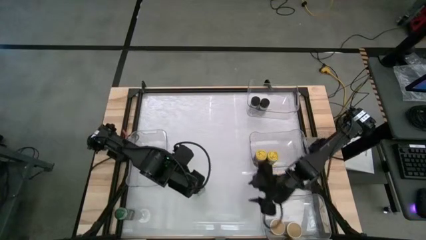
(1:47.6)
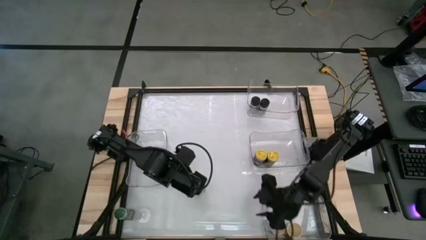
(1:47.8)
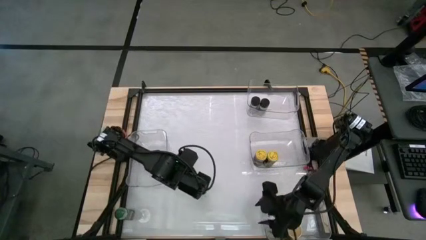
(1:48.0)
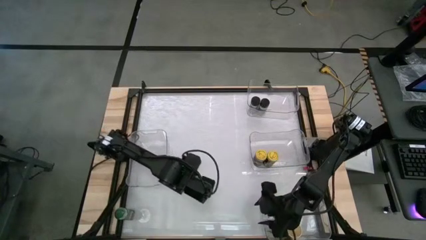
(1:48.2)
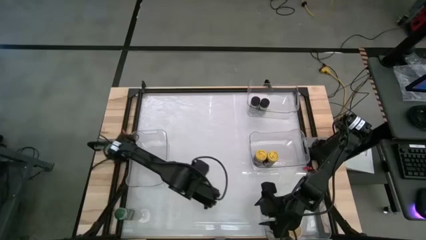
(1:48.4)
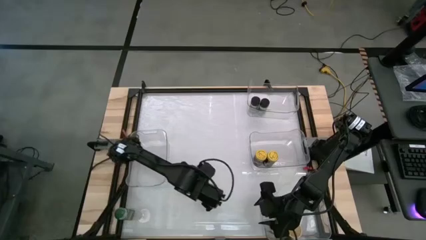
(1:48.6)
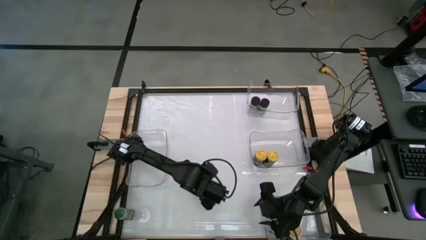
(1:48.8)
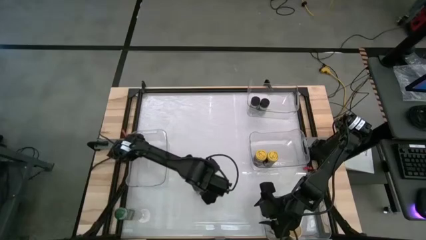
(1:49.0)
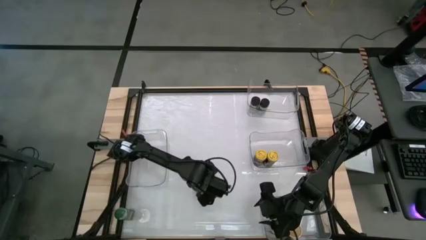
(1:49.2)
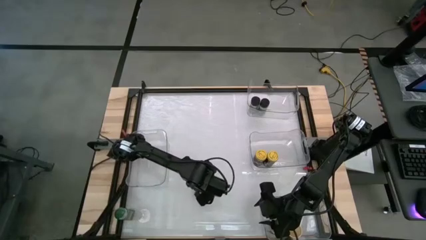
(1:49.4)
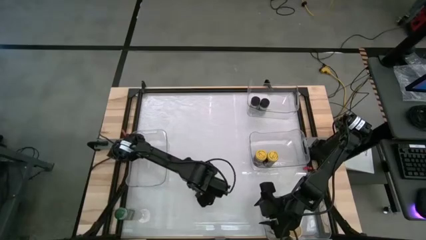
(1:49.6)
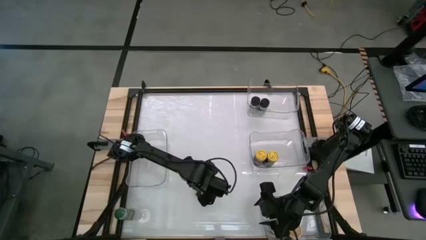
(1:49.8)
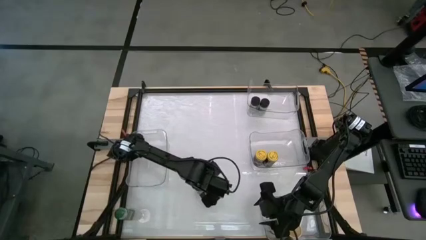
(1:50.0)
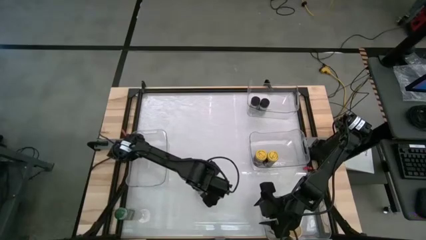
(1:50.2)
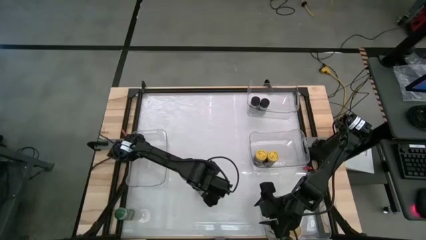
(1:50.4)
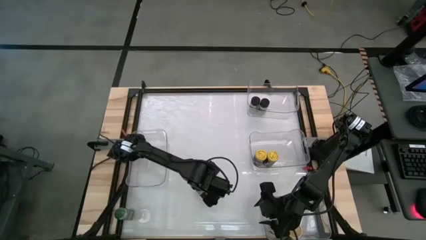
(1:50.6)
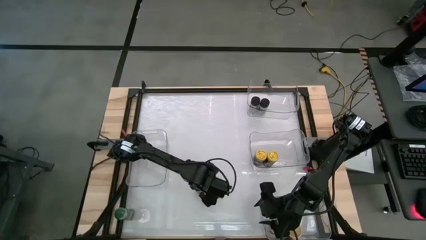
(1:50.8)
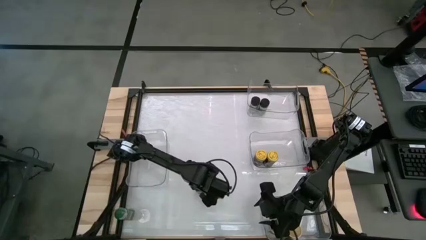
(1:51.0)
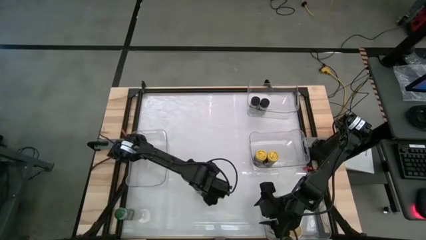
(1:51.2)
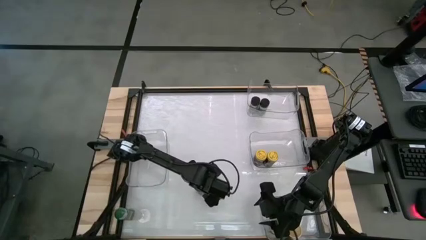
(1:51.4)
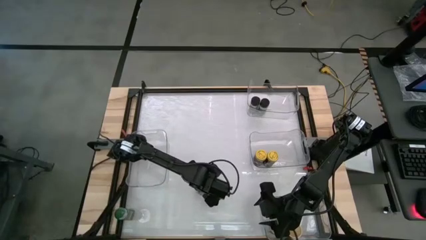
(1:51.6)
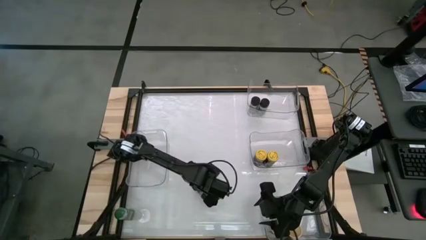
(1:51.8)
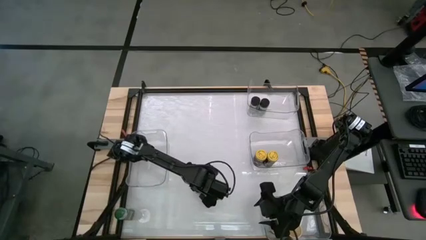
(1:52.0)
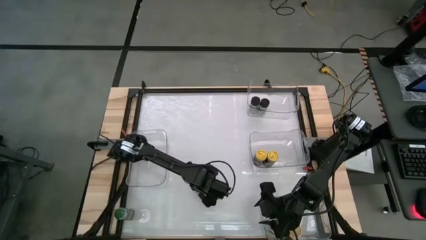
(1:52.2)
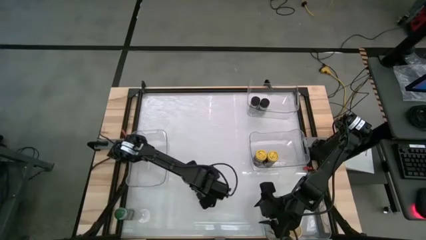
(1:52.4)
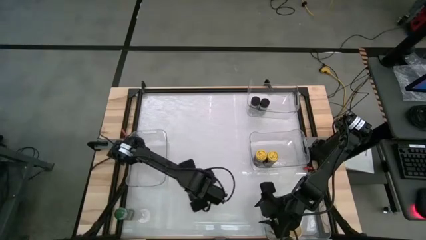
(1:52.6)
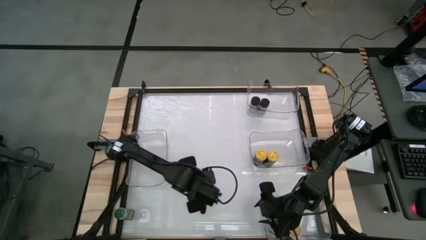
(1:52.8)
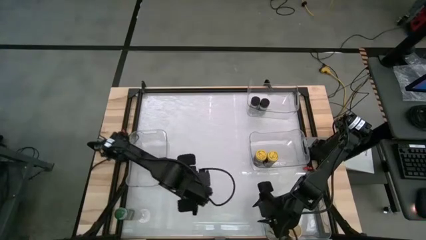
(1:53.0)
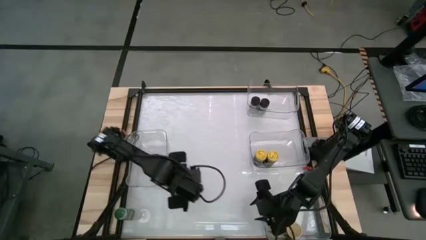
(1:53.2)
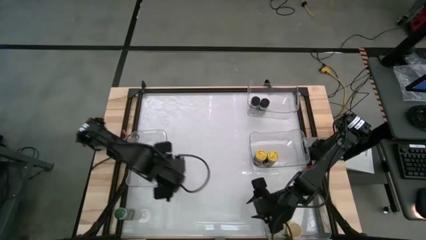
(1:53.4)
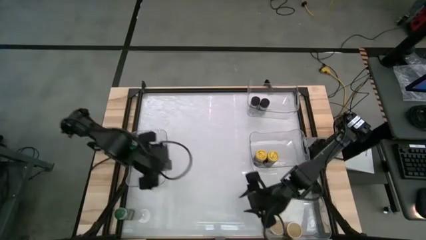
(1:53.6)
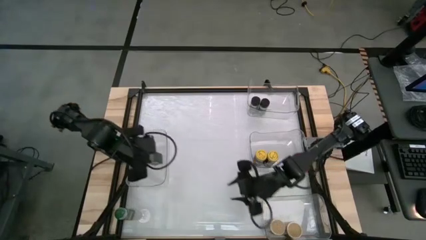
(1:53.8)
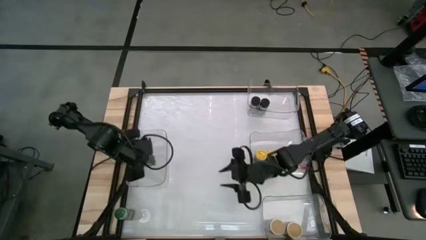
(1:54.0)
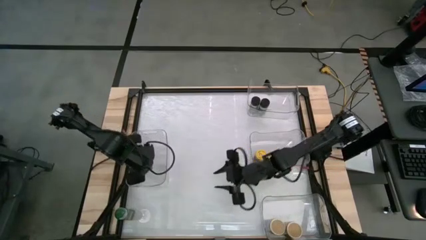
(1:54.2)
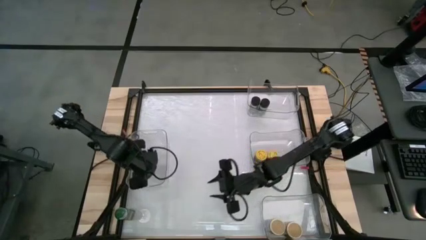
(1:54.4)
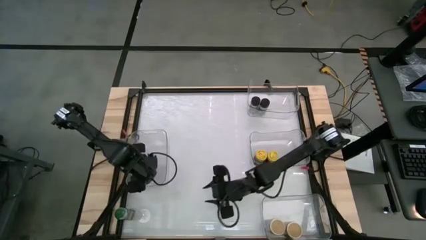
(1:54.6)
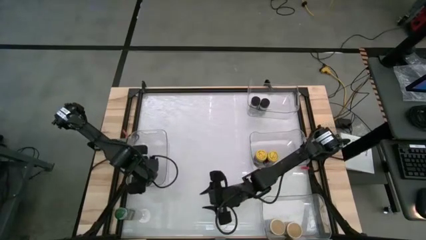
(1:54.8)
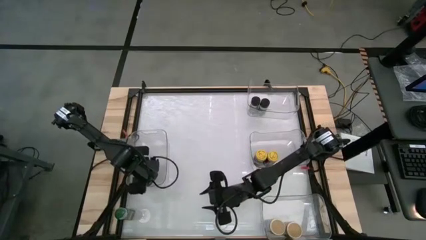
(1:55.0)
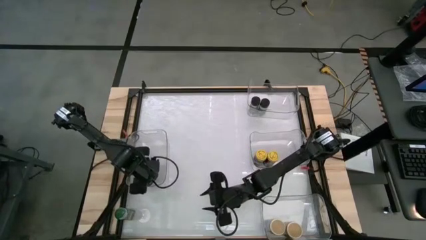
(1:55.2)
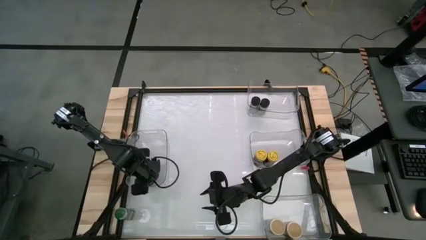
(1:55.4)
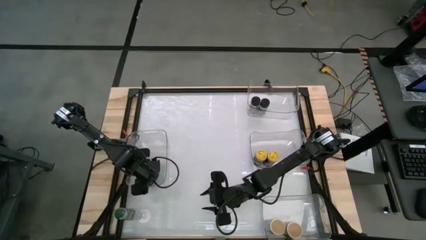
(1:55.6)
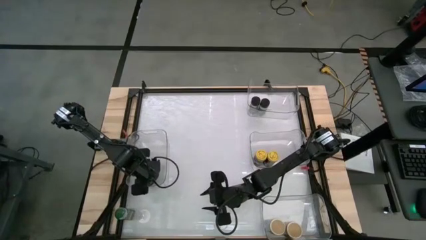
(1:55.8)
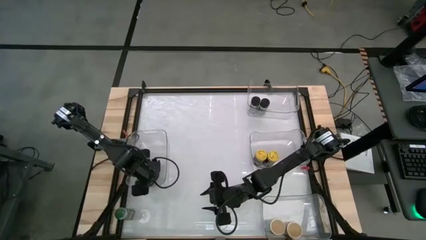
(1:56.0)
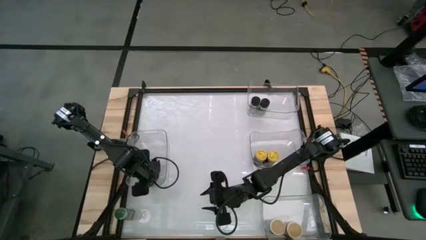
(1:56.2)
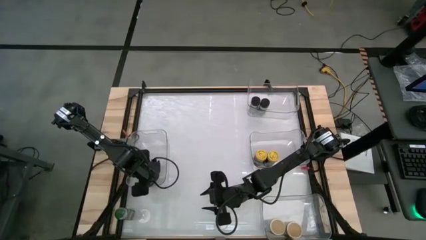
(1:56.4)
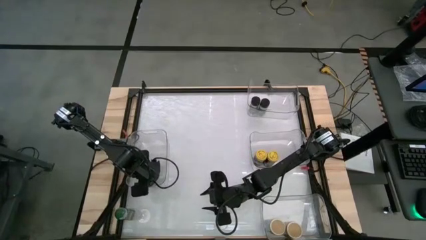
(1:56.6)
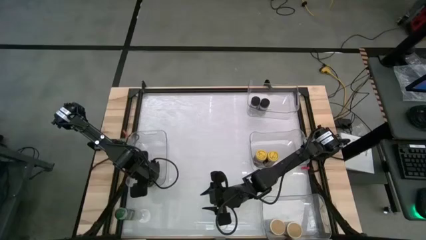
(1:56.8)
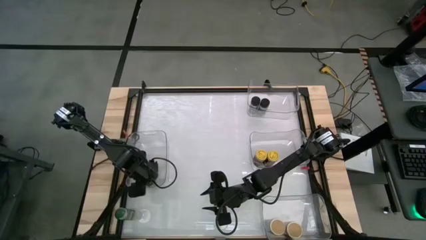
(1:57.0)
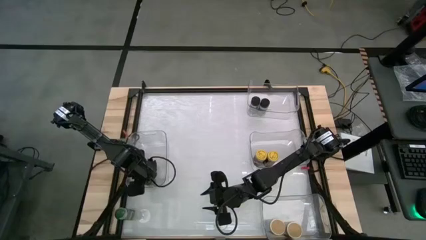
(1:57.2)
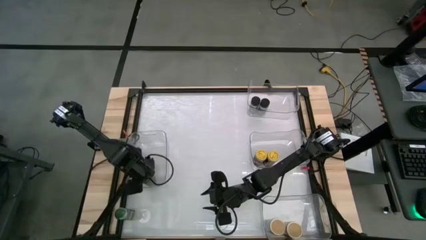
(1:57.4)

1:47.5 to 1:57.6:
Task: Sort spices by type
Put the top green seasoning bottle into the middle left transparent bin
